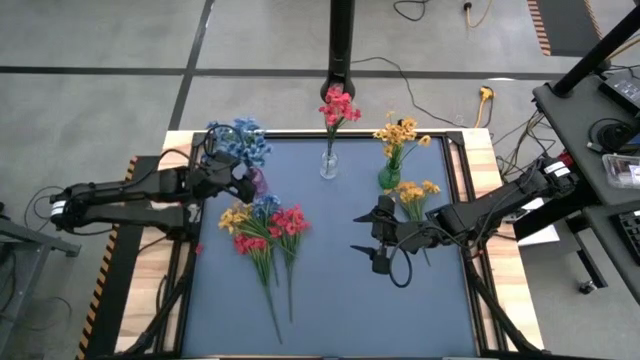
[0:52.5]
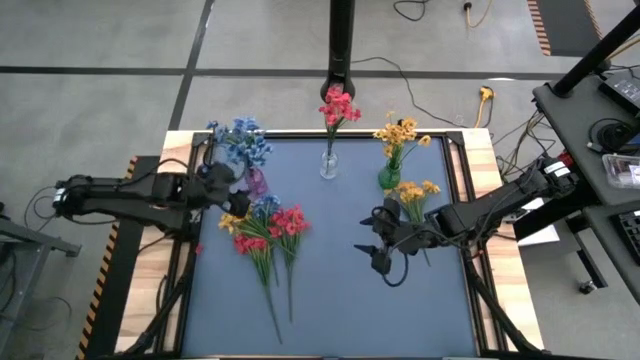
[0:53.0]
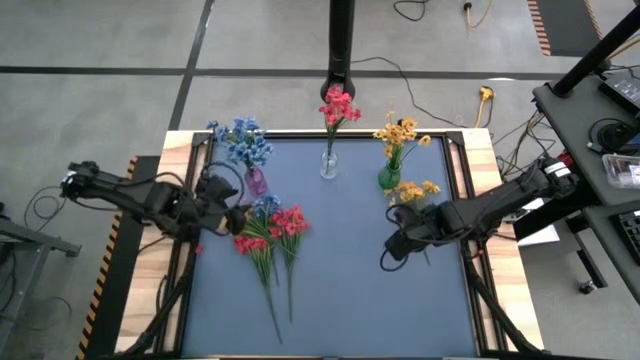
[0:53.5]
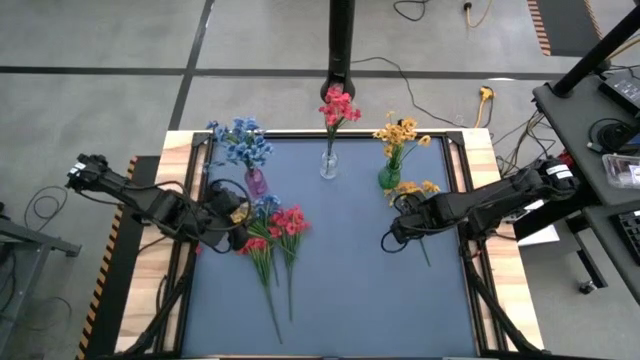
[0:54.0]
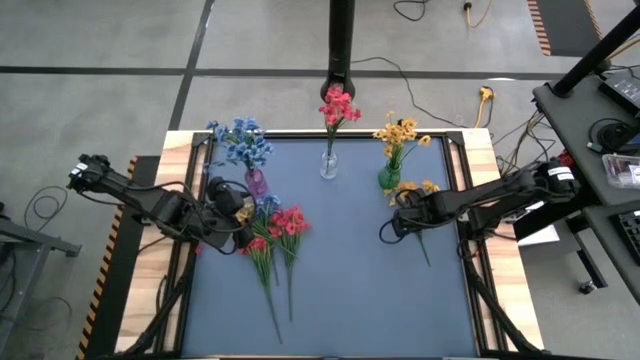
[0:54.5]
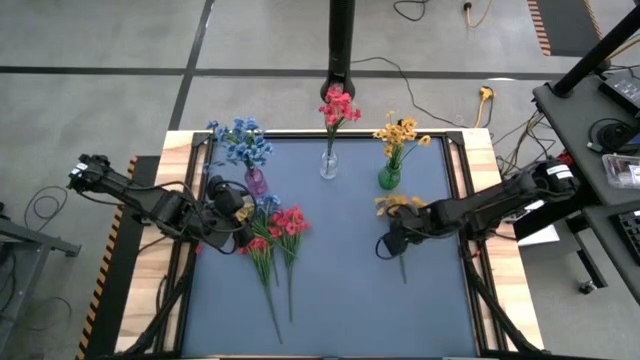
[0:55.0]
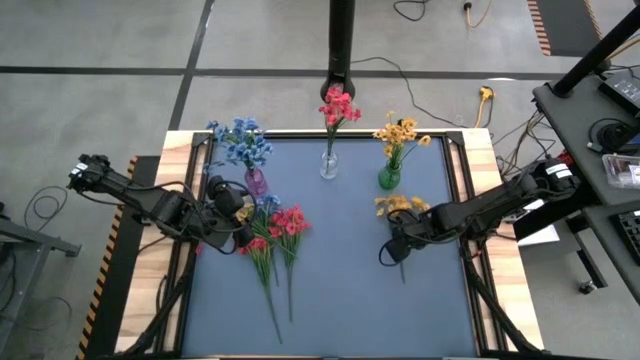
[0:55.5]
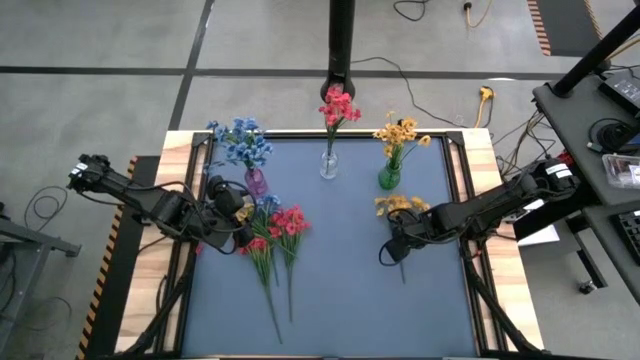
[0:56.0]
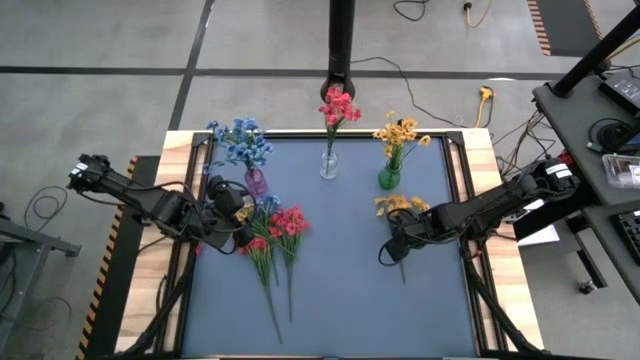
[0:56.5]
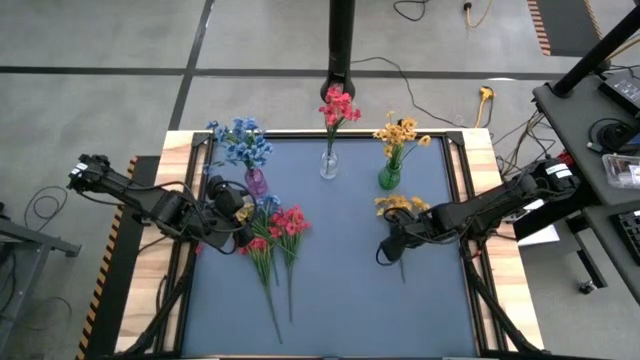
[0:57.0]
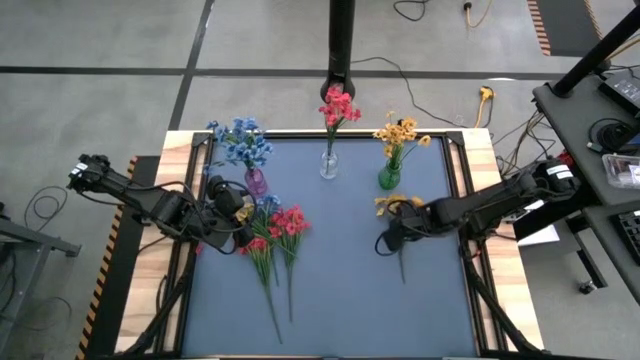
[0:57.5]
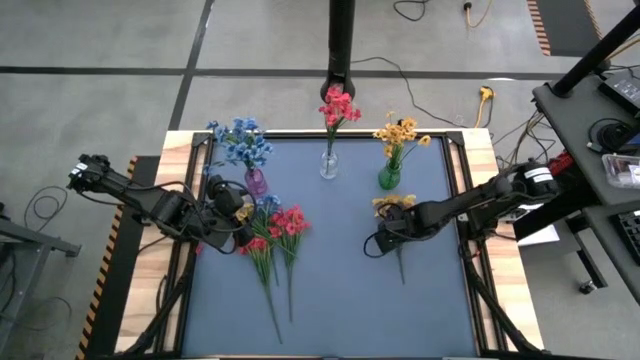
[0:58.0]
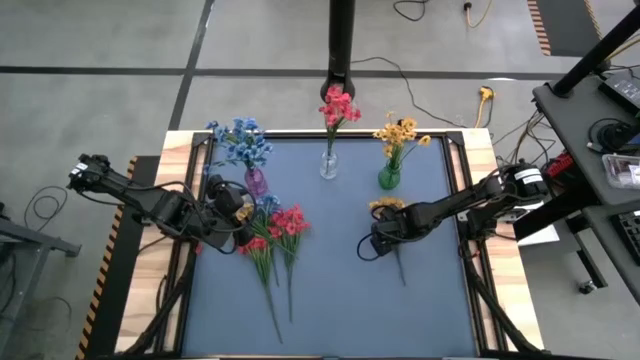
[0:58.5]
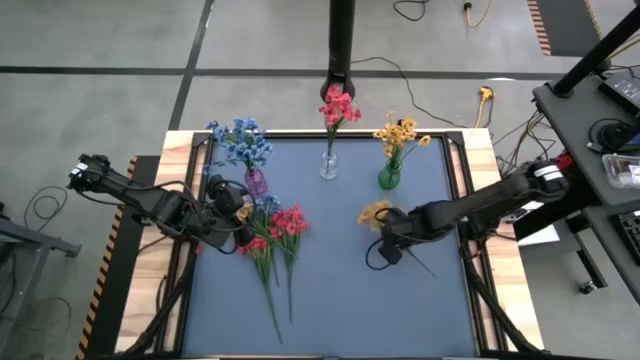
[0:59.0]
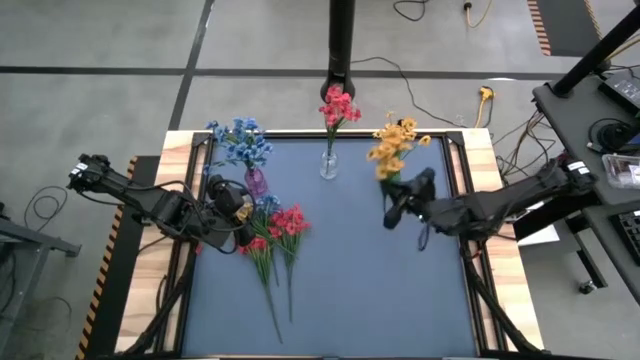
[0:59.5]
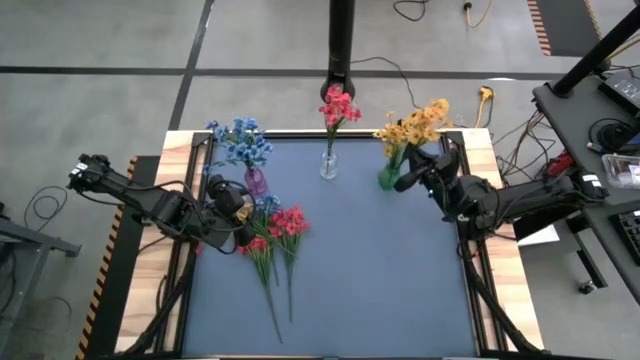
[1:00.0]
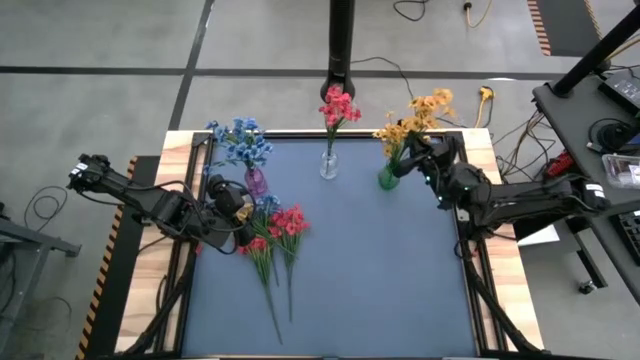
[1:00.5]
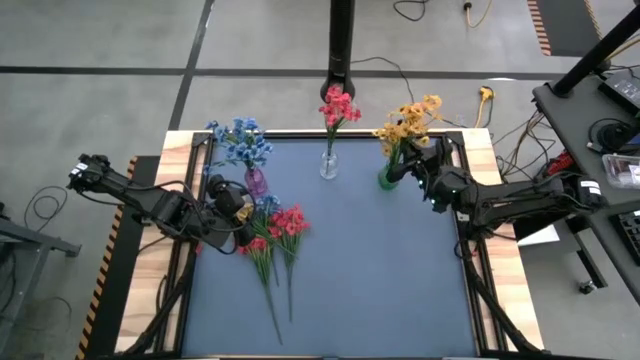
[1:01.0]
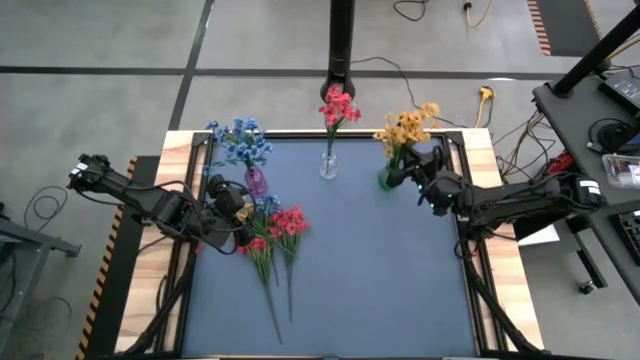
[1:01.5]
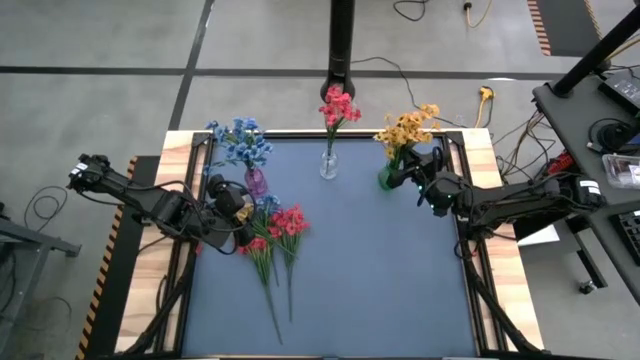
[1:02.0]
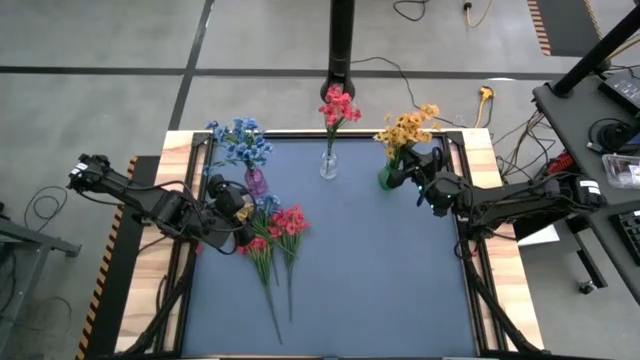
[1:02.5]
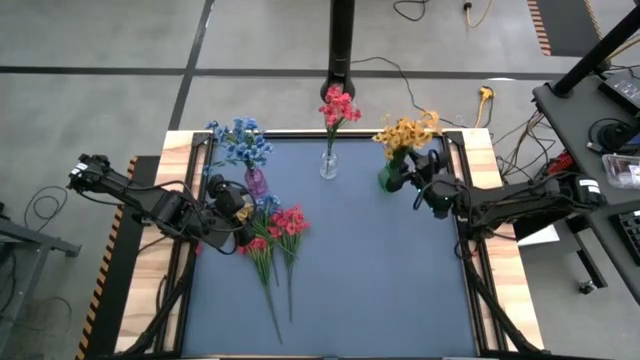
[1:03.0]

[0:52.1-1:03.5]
Task: Sort flowers into vase by color
Put the right yellow flower into the green vase

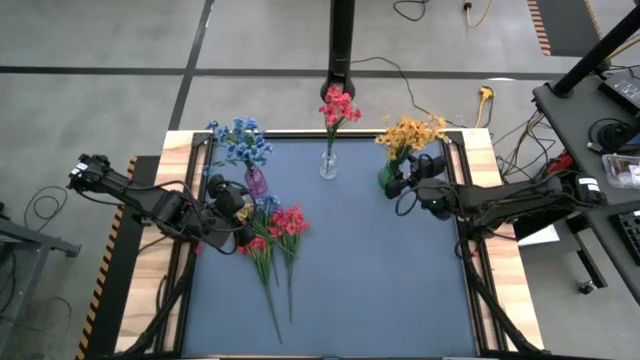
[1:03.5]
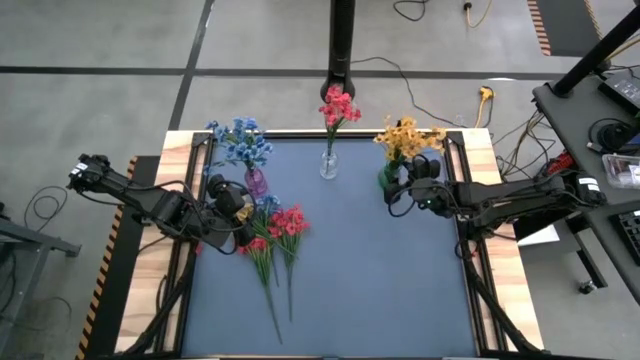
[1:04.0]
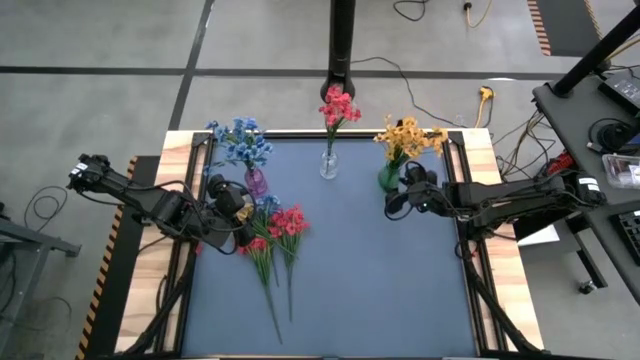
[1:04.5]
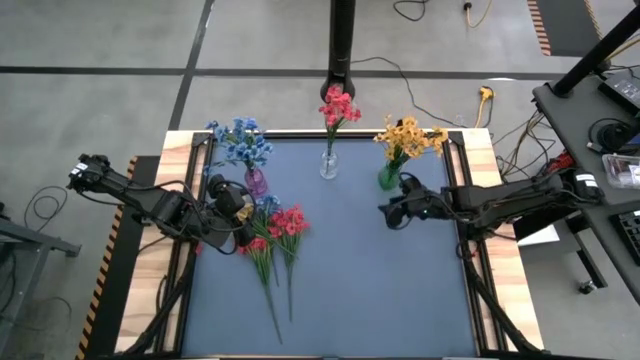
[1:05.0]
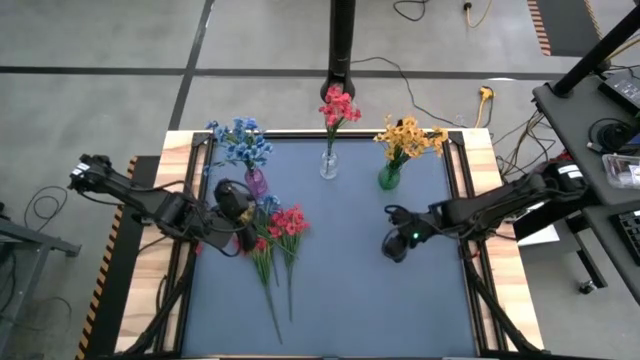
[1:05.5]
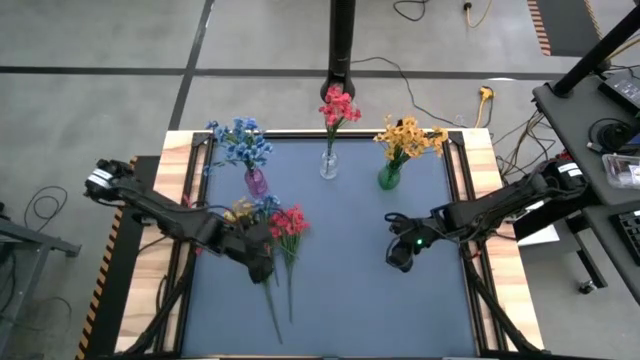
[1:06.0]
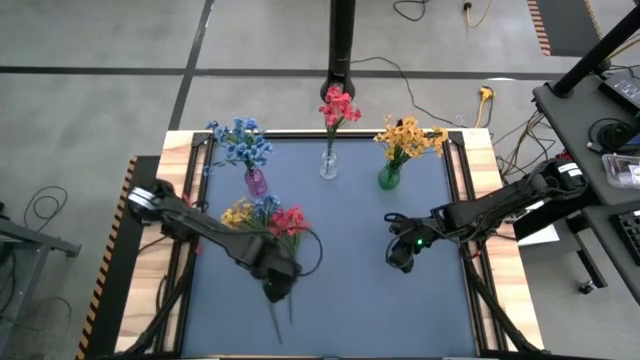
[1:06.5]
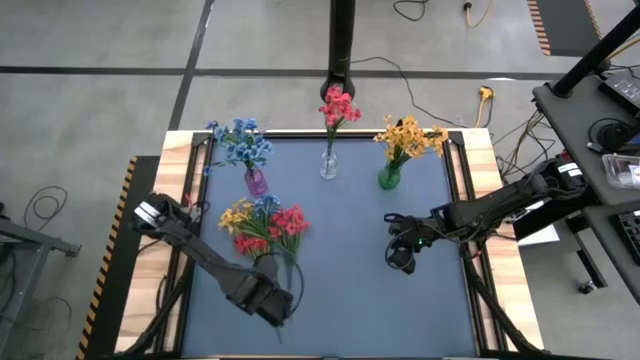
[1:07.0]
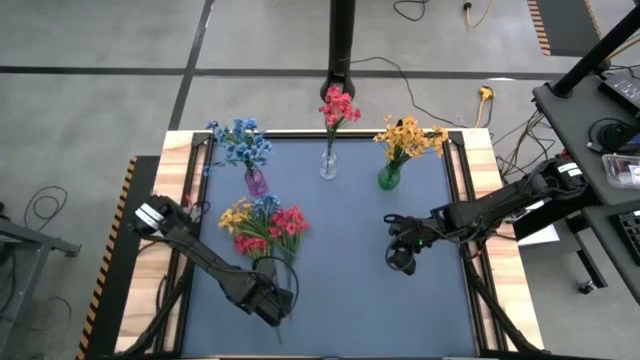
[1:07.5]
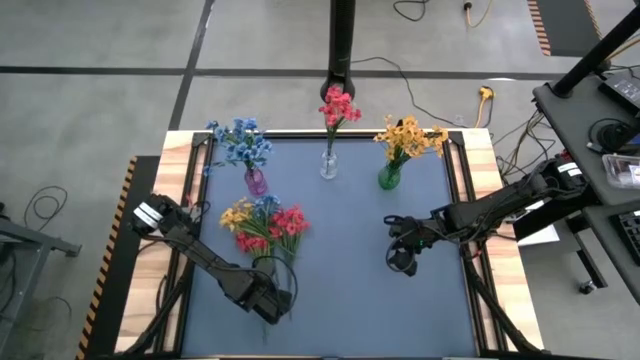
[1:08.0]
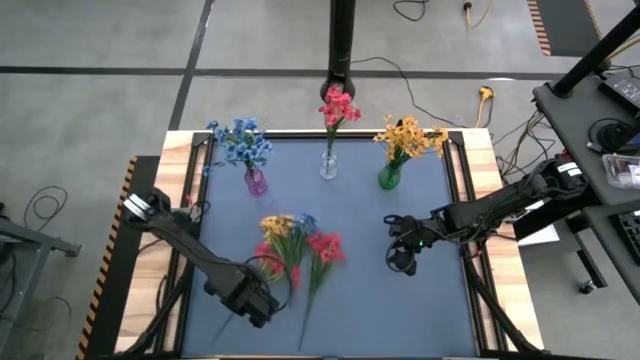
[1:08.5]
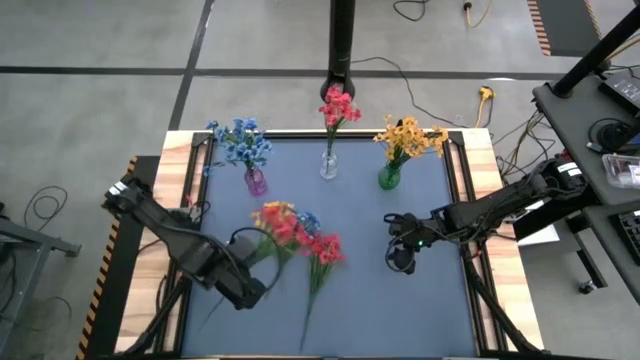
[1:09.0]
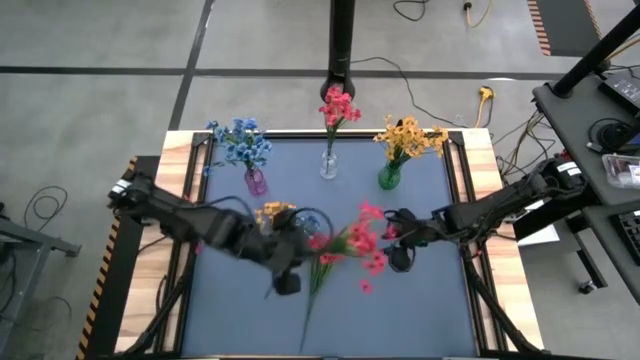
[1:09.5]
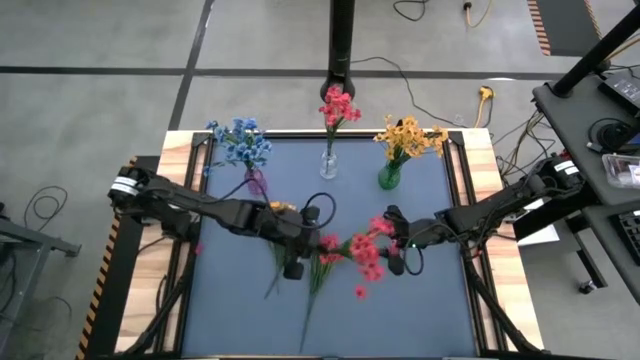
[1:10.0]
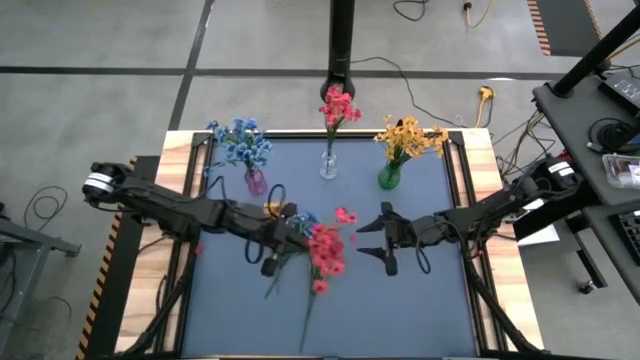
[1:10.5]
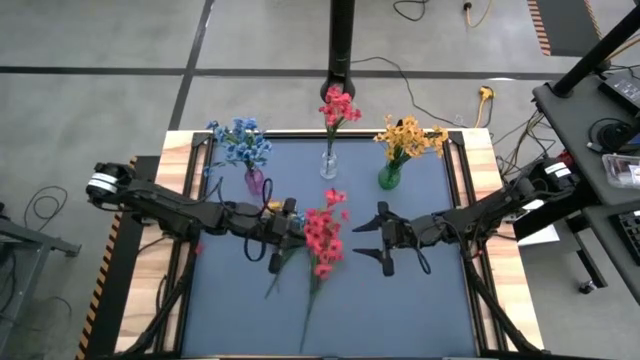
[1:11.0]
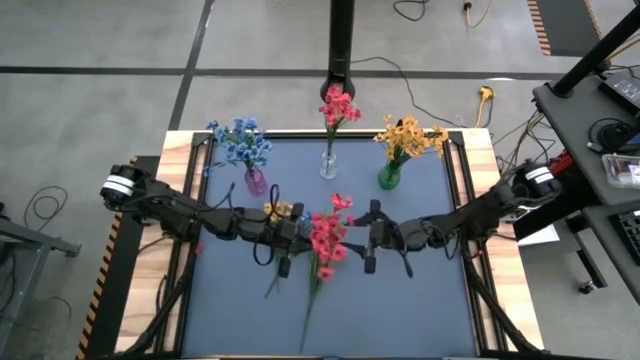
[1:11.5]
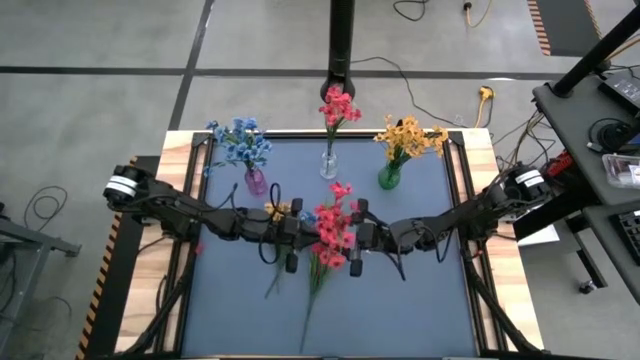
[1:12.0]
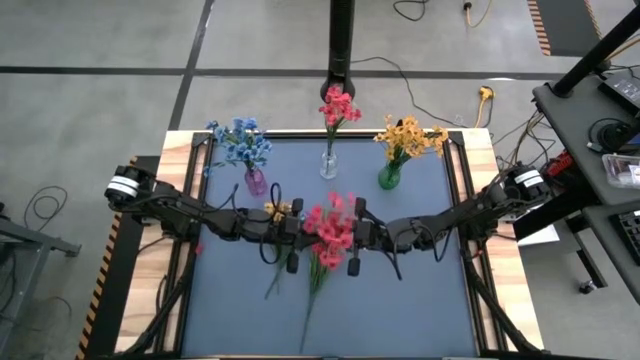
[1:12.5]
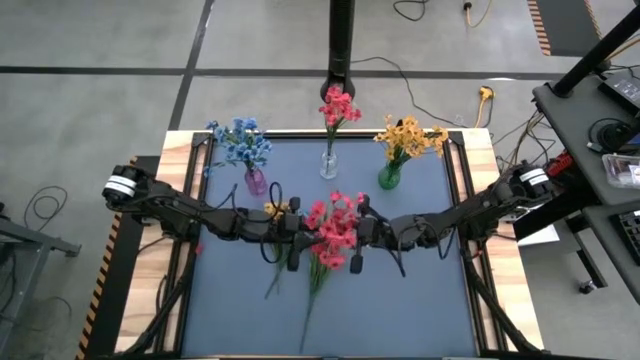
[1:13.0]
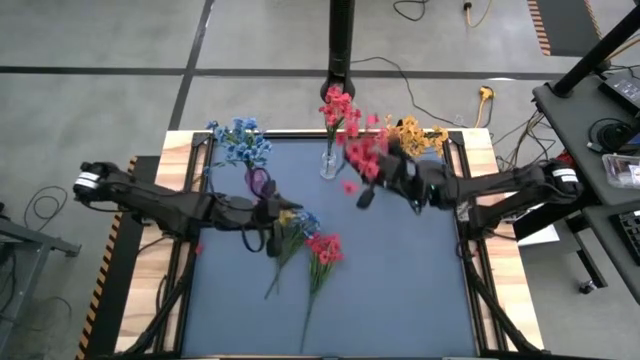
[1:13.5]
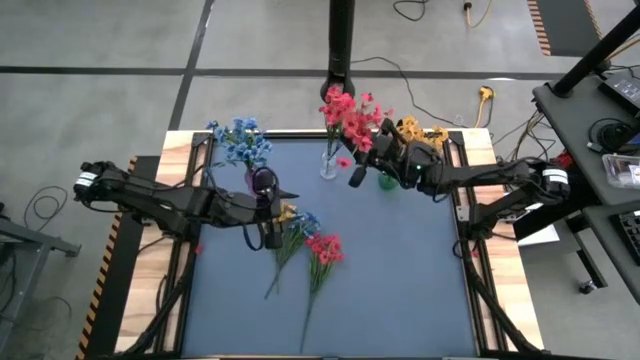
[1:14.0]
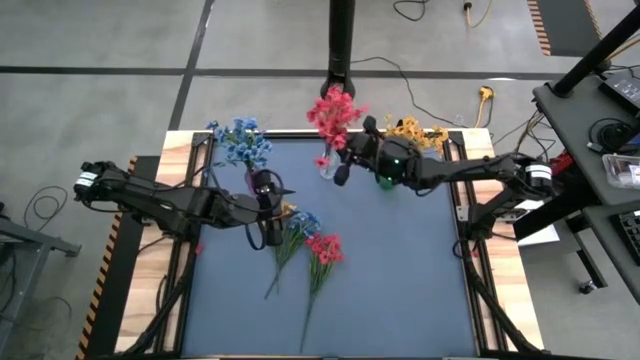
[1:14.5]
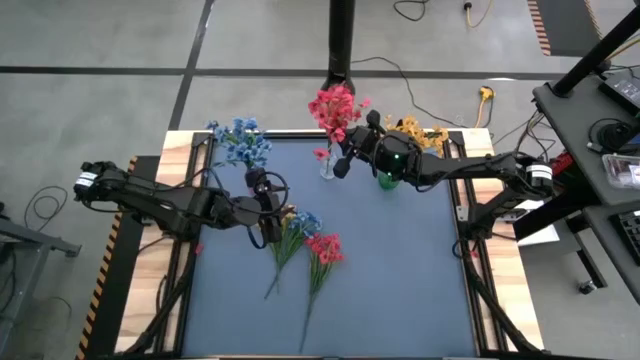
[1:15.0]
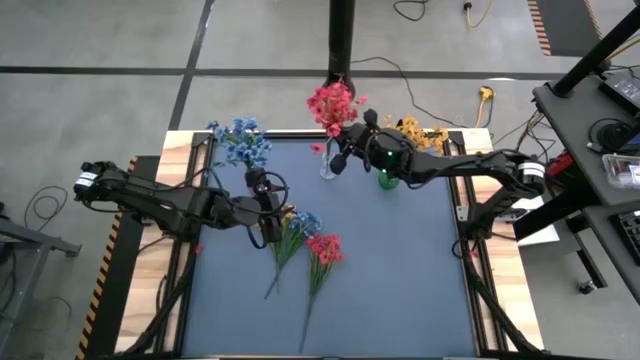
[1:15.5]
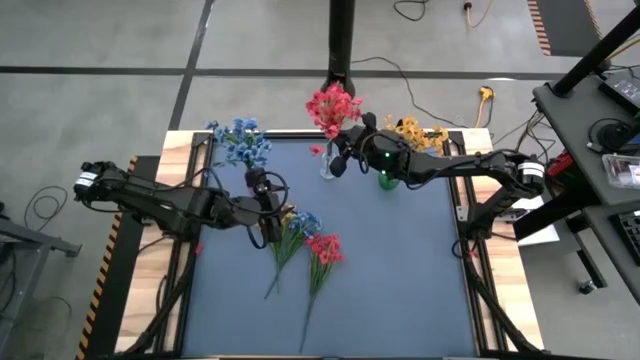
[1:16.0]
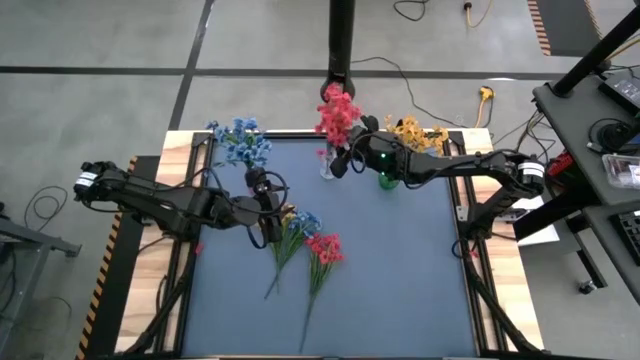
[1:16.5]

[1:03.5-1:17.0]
Put the left red flower into the transparent vase
